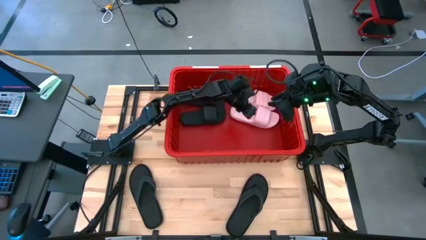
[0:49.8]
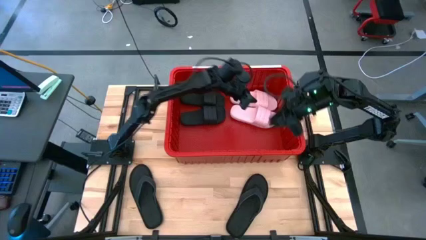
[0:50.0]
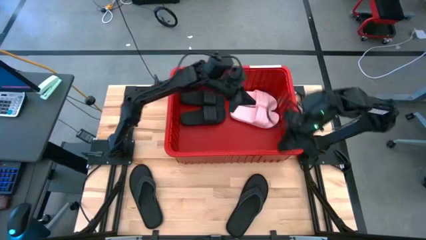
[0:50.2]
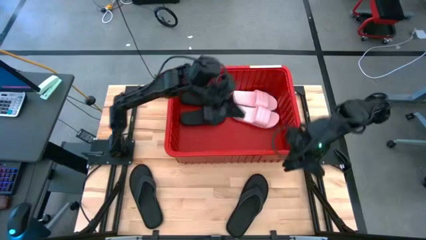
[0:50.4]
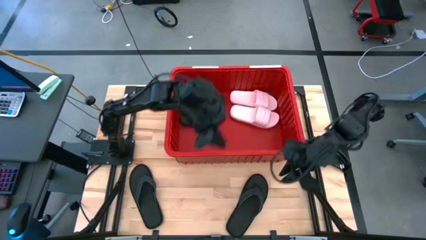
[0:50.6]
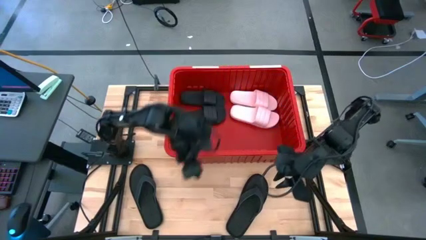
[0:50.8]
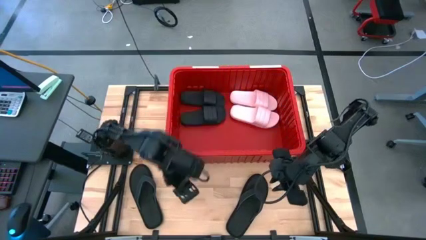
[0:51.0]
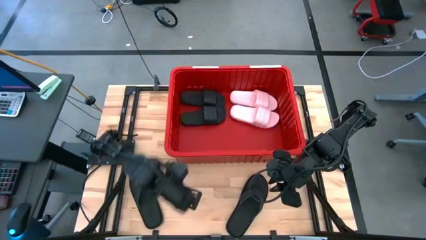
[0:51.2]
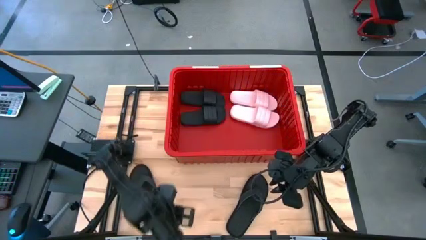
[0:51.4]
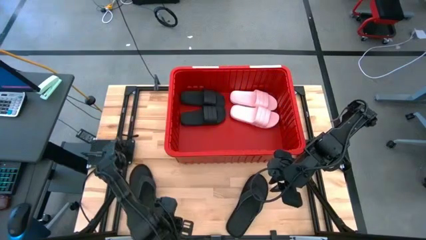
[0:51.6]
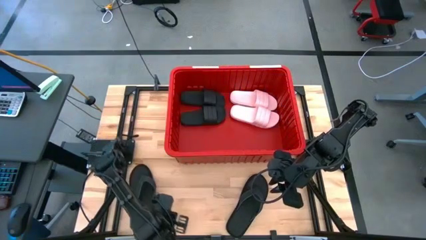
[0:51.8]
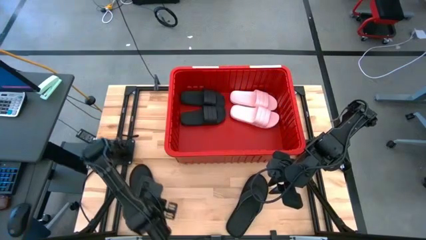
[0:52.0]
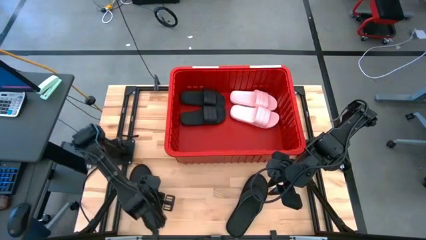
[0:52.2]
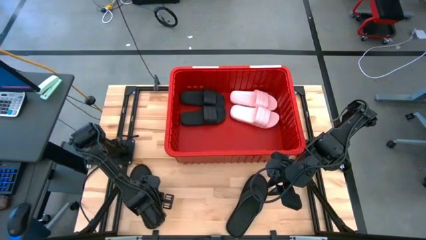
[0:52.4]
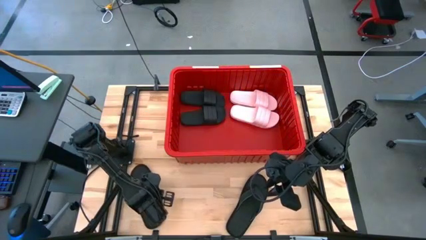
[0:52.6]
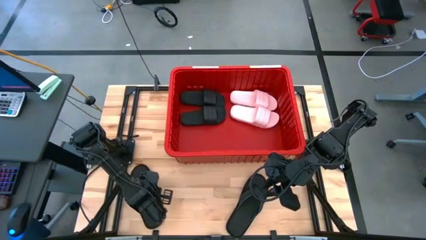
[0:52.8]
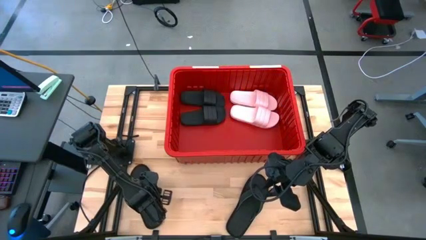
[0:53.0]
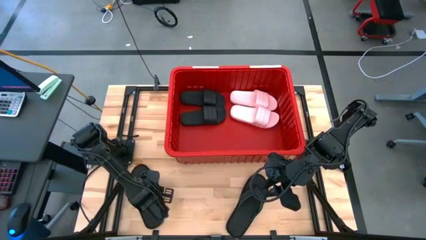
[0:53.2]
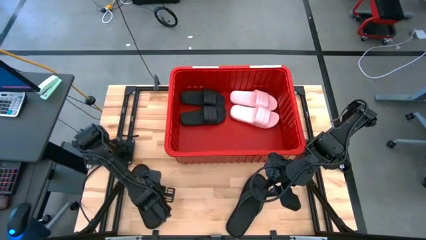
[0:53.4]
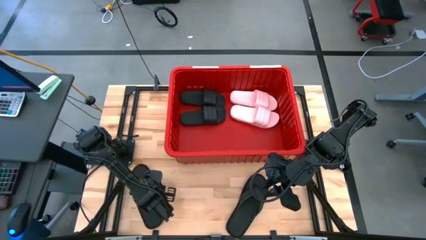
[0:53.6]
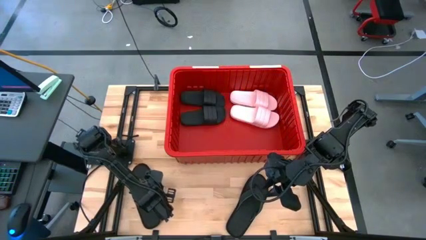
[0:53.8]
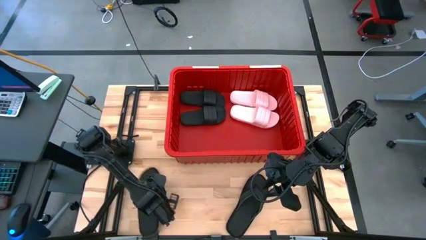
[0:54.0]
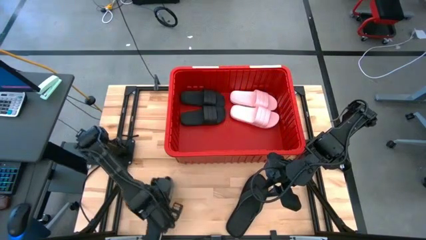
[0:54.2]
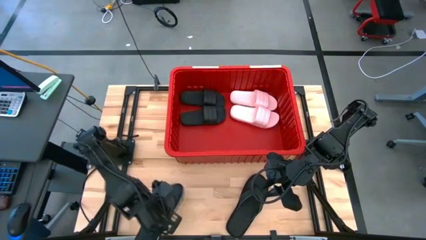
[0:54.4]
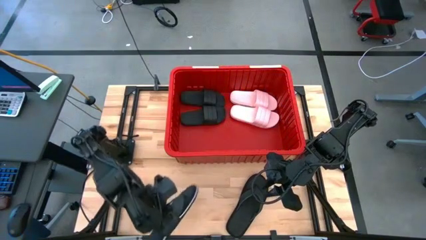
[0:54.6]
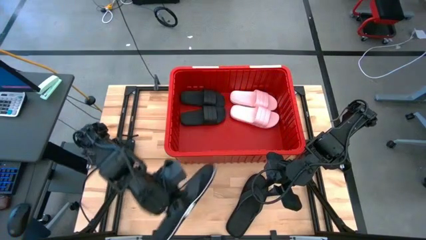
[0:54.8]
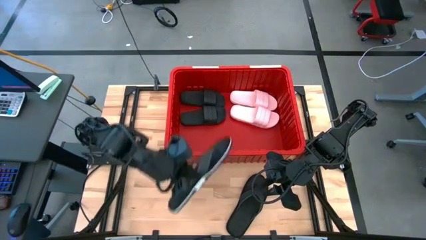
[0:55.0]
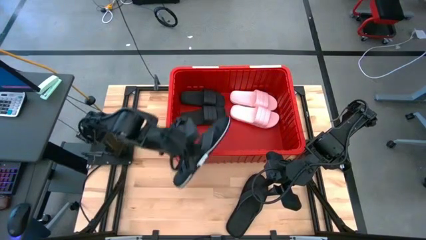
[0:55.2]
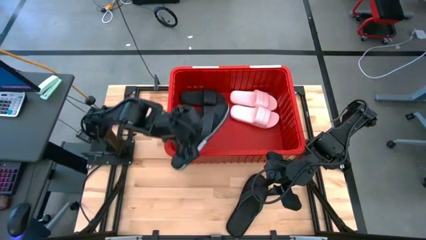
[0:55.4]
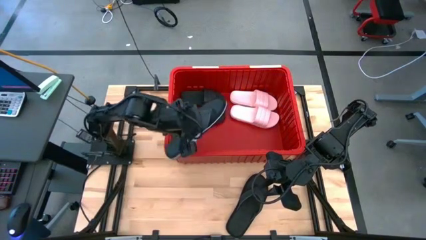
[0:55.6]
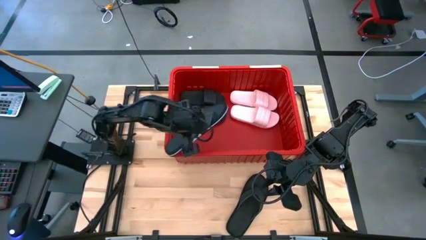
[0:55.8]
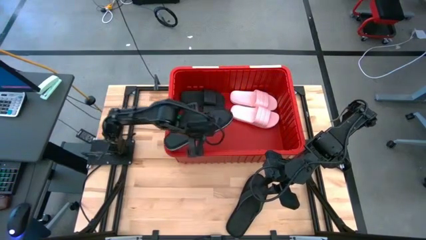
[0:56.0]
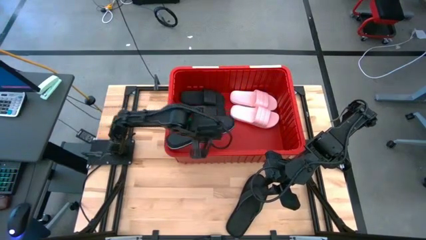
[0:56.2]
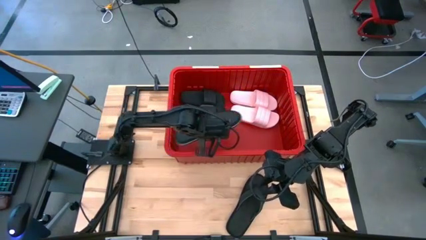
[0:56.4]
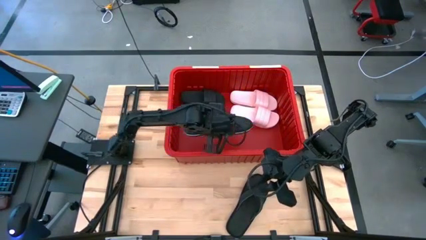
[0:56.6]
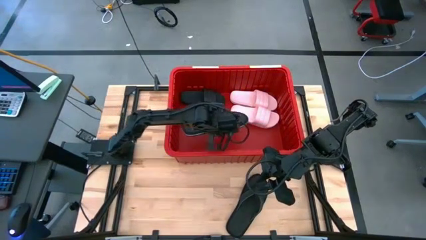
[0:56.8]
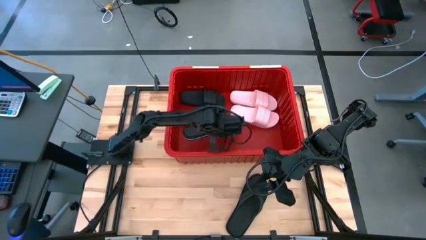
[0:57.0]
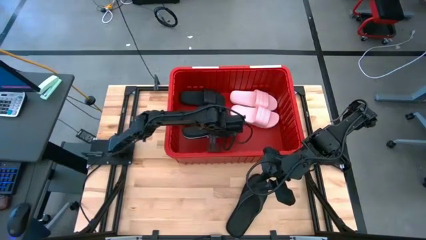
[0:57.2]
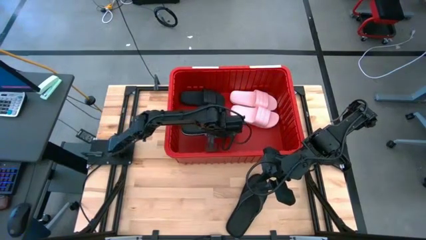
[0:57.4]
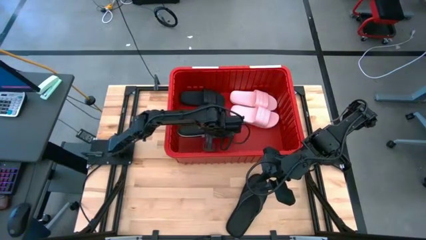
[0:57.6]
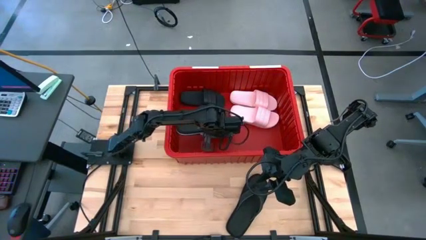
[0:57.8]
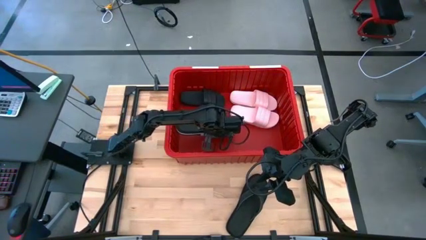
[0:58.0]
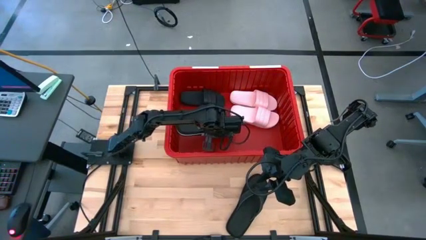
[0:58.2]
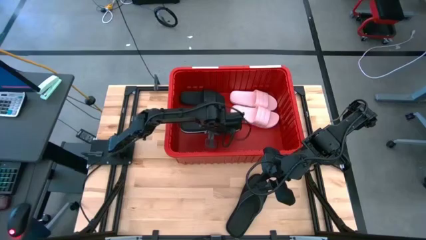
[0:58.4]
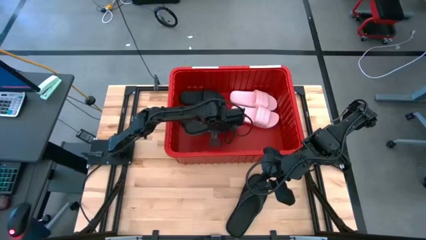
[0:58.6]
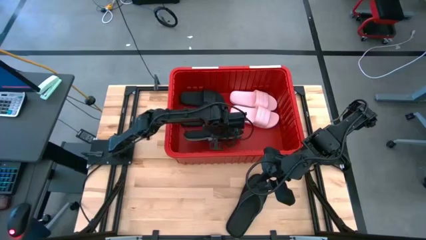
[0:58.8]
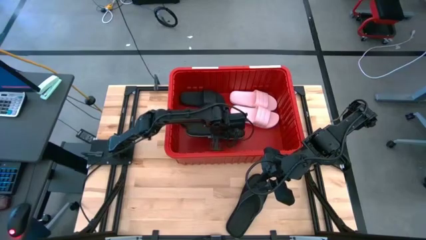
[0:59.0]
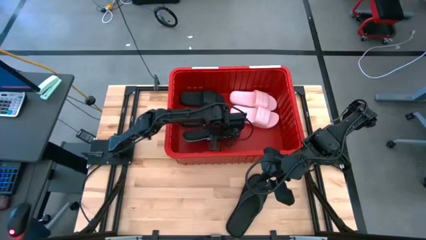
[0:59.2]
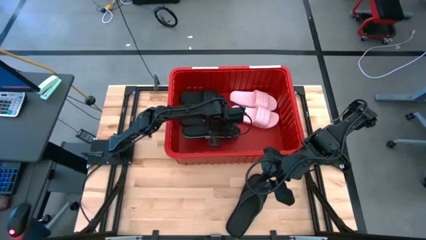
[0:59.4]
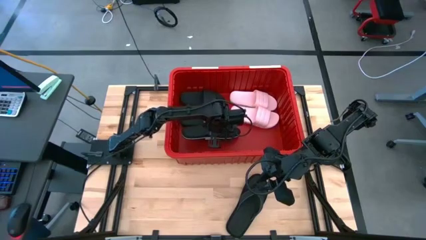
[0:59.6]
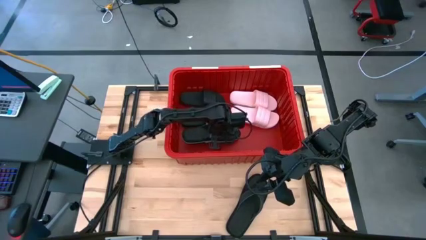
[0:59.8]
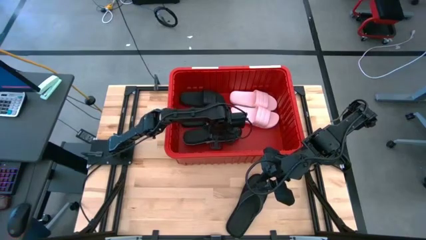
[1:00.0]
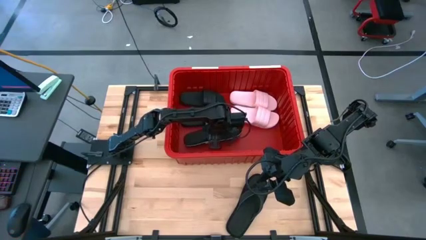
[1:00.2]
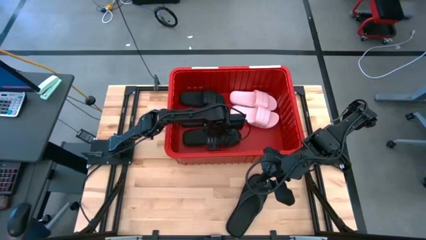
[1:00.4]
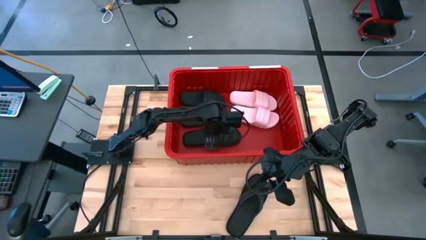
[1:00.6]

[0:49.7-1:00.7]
Task: Pick and place slides into bin
Put the left black slipper into the red bin
